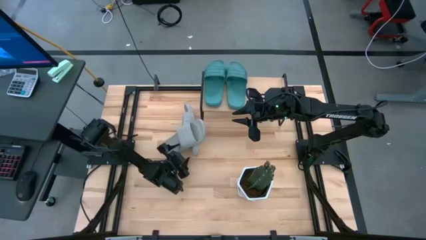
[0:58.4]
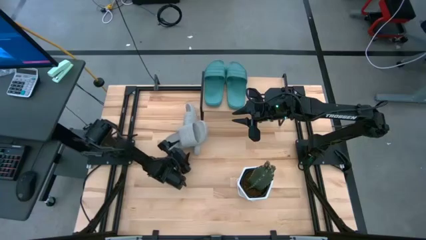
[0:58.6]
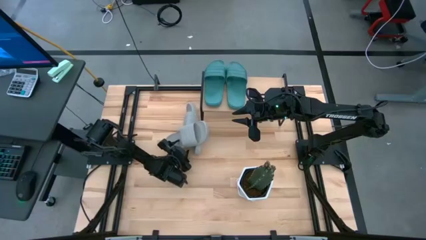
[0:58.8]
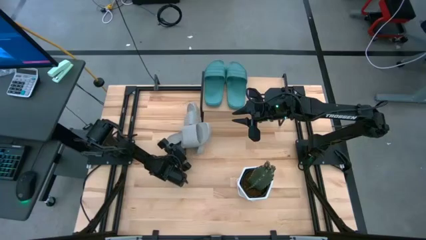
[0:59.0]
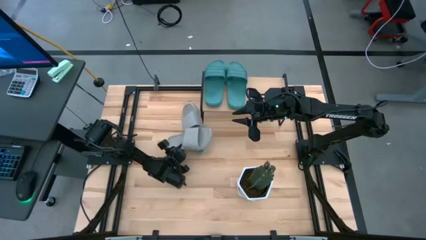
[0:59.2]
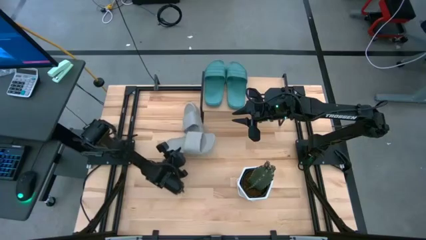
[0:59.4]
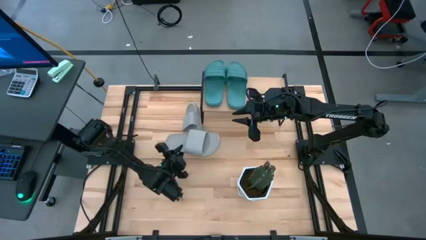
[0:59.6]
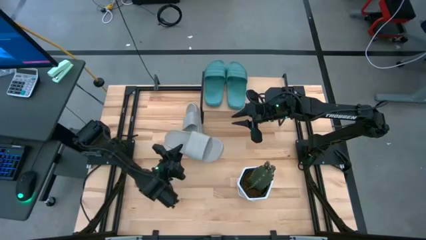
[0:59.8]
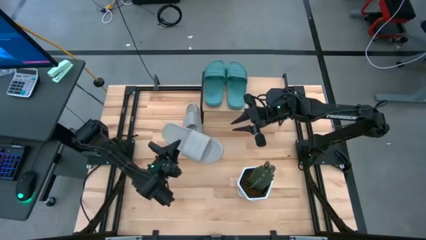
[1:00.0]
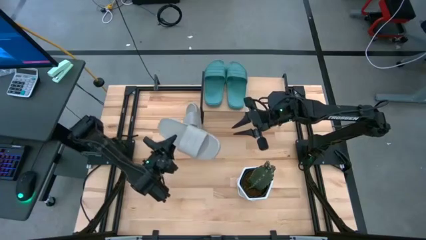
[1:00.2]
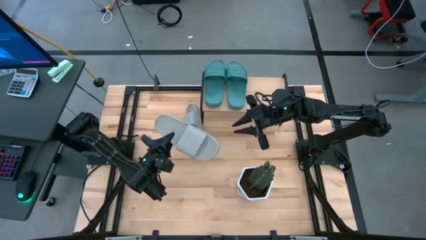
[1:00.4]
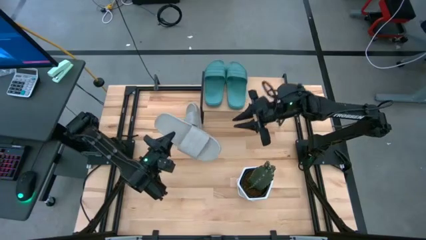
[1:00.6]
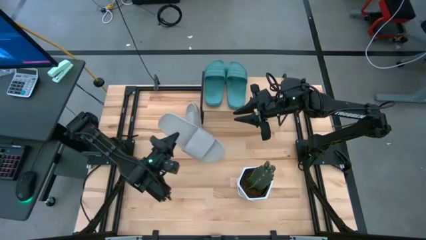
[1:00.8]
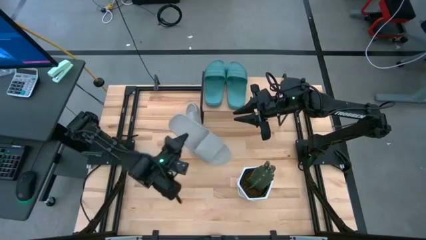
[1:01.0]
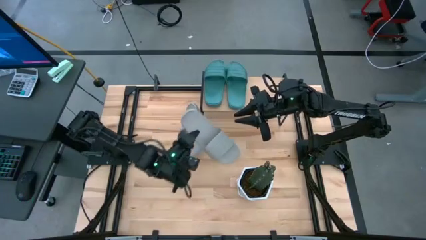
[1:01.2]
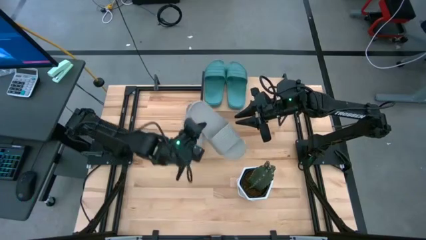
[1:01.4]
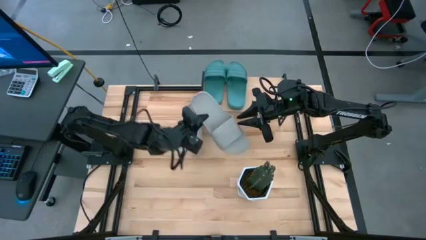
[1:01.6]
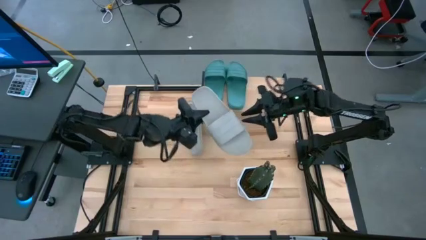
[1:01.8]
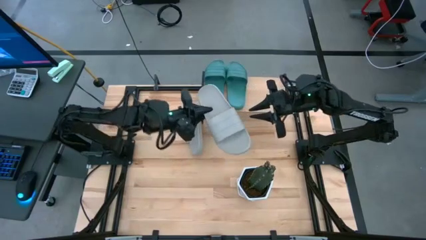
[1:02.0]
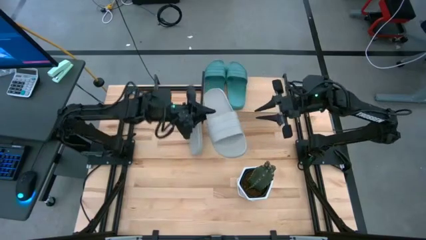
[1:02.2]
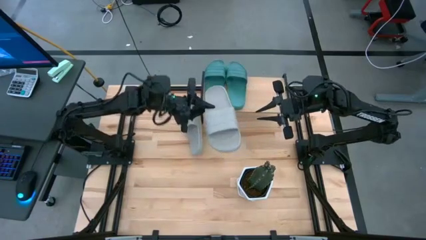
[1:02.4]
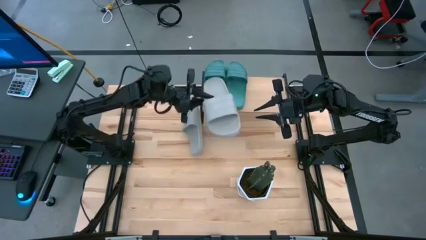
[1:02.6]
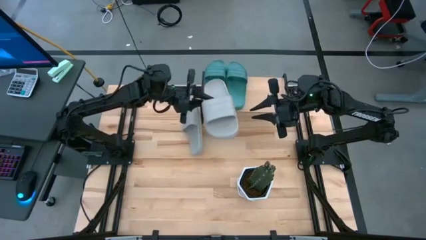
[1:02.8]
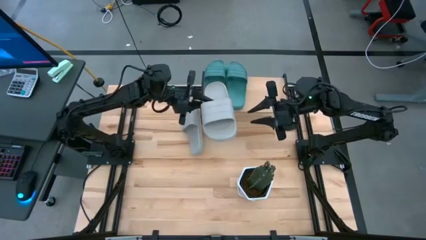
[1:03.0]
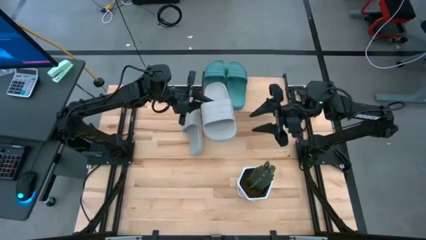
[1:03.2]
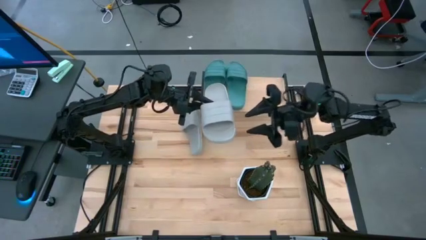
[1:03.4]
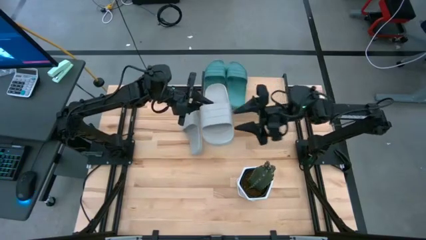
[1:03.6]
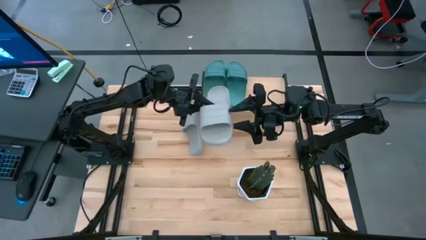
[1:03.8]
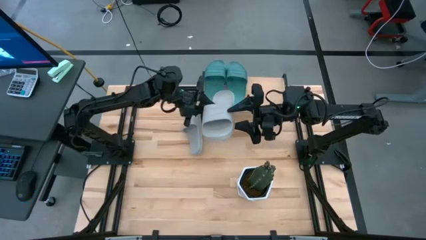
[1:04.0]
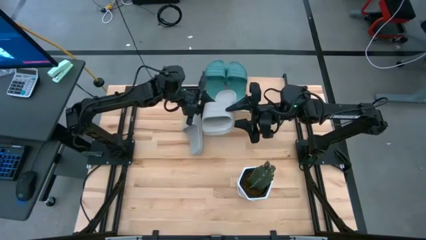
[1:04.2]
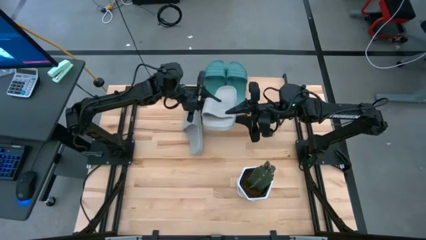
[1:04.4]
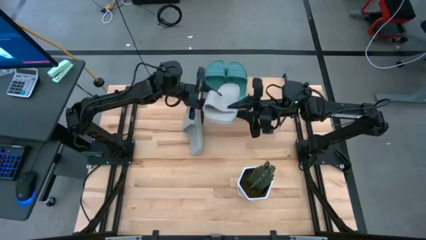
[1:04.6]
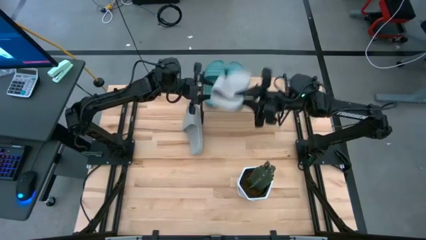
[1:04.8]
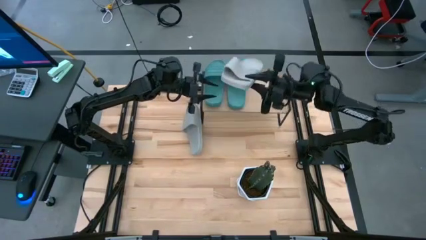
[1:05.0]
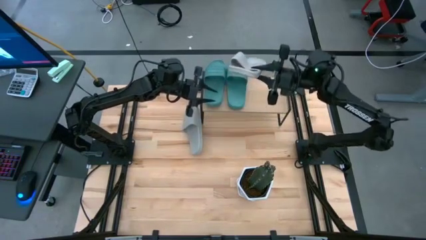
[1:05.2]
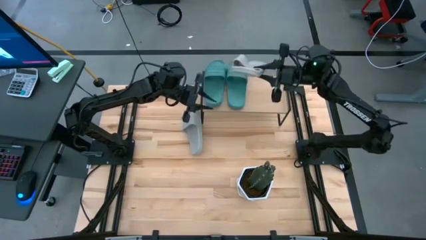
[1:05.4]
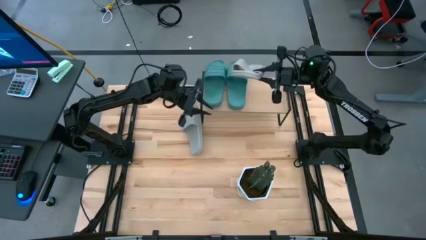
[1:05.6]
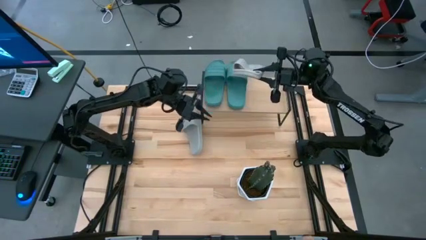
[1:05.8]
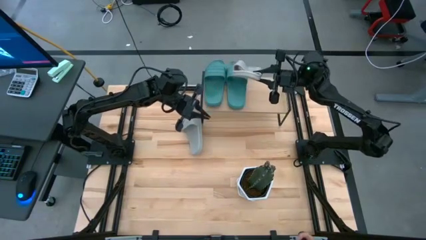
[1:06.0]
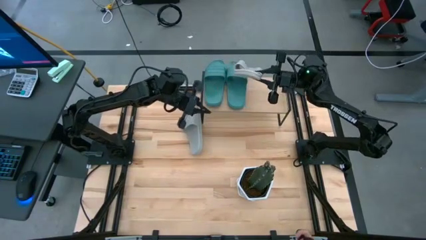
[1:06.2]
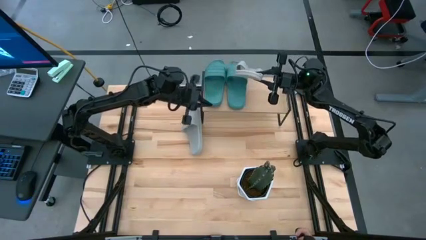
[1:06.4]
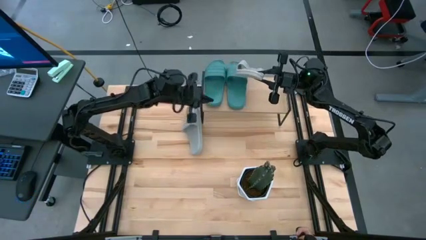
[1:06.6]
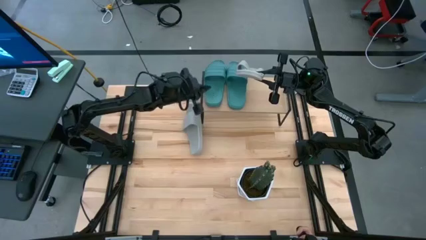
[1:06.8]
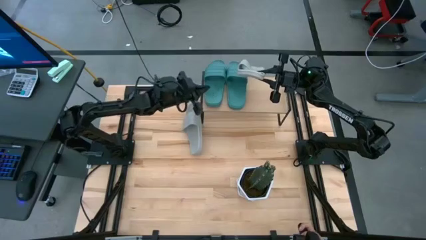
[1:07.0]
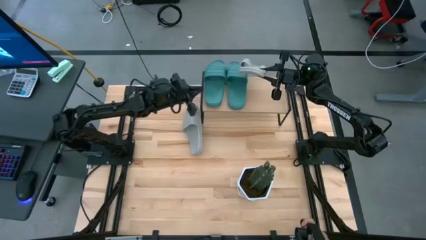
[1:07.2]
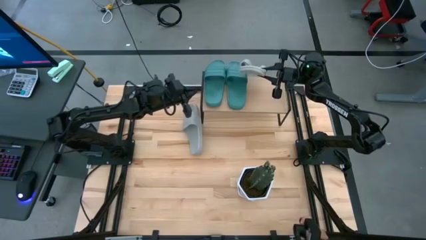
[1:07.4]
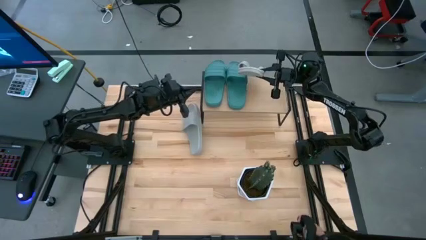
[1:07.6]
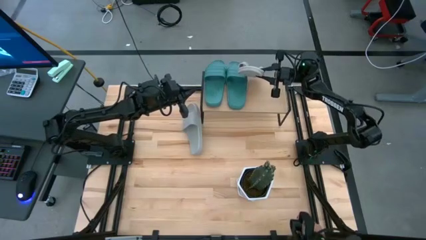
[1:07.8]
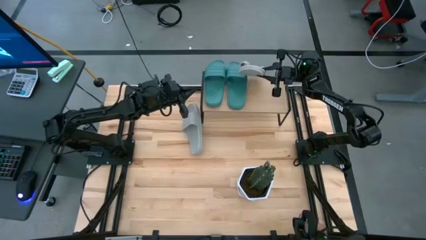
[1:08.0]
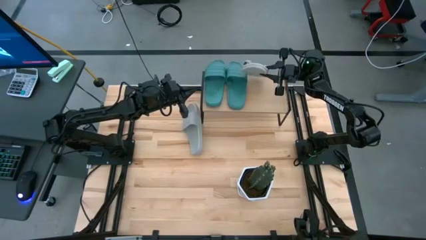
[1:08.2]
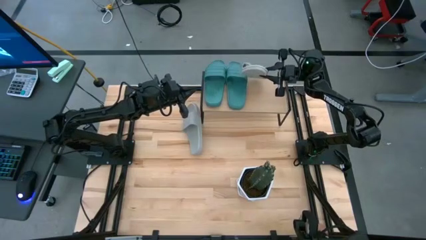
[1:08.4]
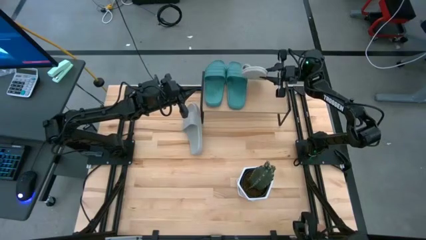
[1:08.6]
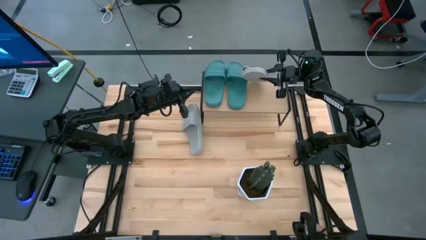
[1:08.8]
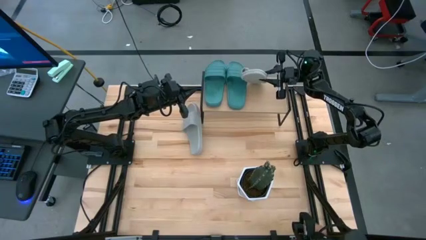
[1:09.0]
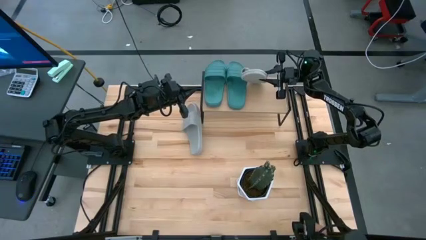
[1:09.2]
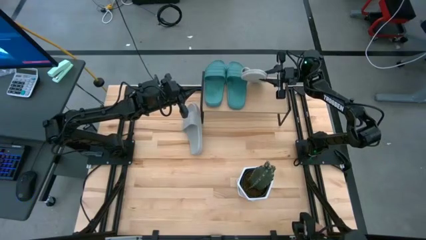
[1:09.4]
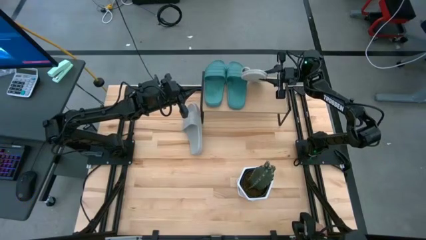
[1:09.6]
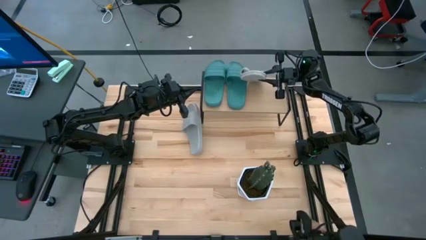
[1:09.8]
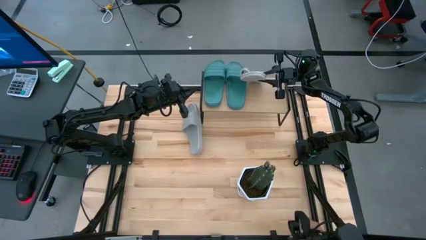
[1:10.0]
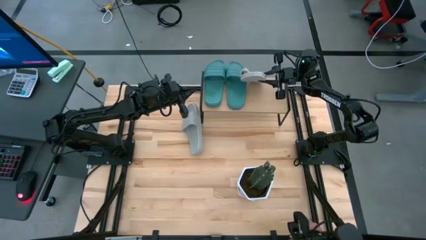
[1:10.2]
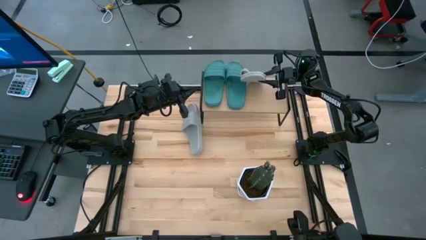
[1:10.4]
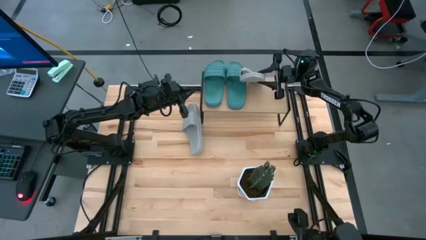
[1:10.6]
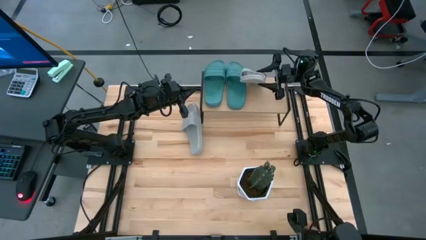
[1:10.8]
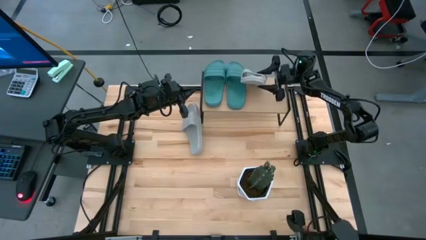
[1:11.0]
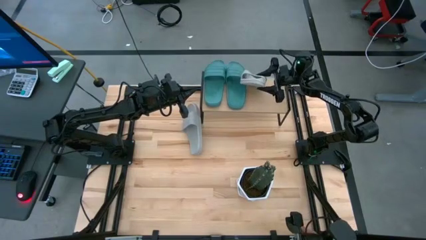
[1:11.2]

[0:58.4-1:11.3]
Task: Pick and place slides into the shelf
Put the bottom gray slides on the shelf

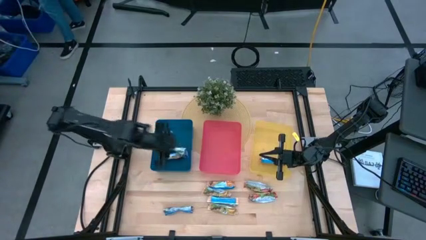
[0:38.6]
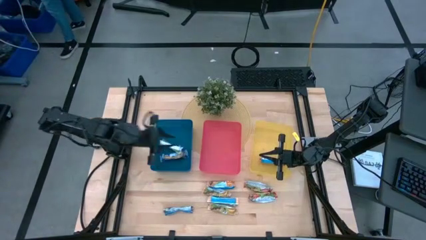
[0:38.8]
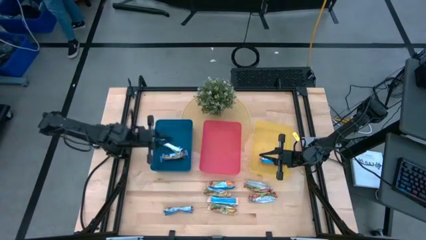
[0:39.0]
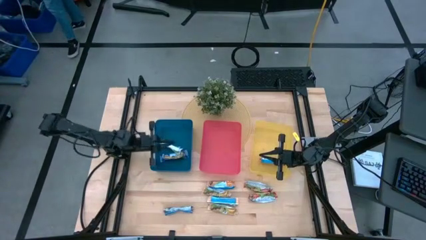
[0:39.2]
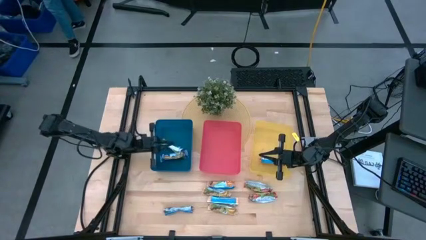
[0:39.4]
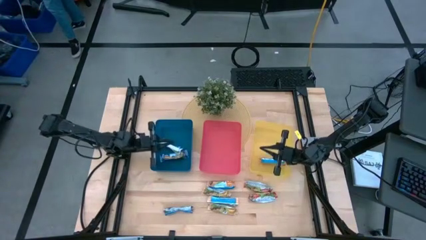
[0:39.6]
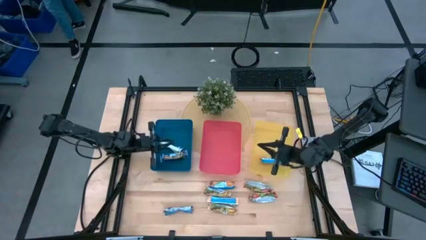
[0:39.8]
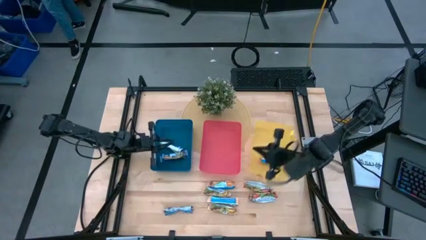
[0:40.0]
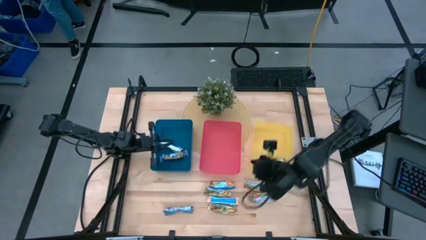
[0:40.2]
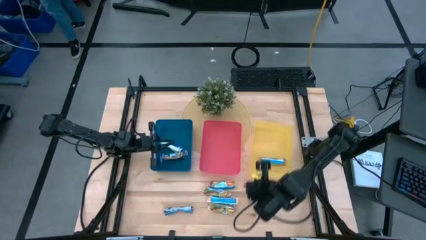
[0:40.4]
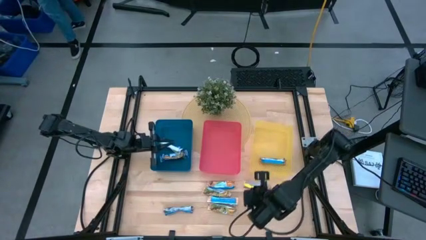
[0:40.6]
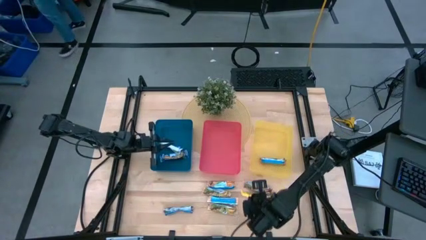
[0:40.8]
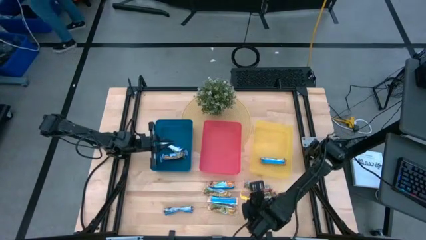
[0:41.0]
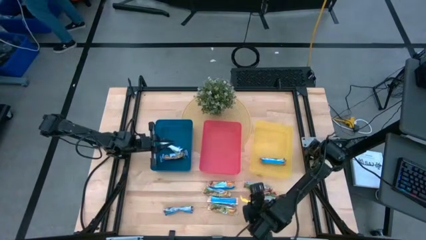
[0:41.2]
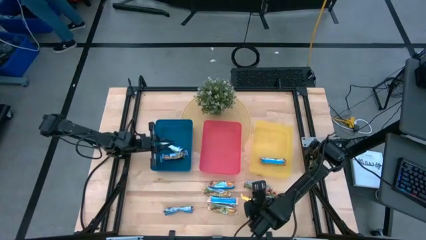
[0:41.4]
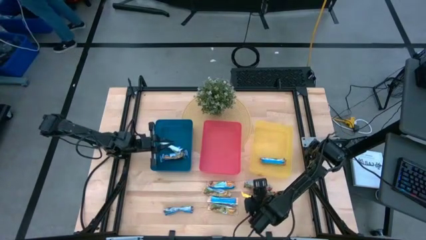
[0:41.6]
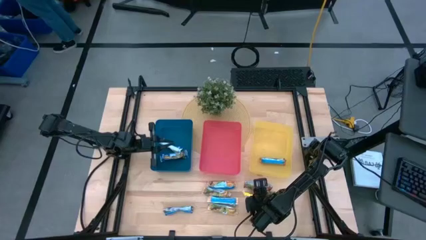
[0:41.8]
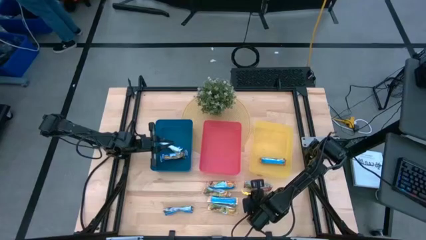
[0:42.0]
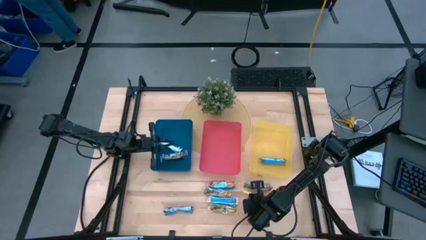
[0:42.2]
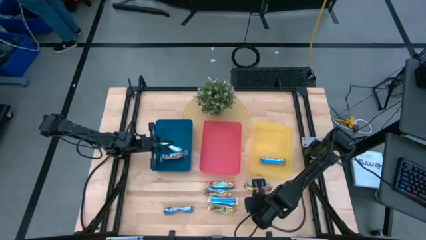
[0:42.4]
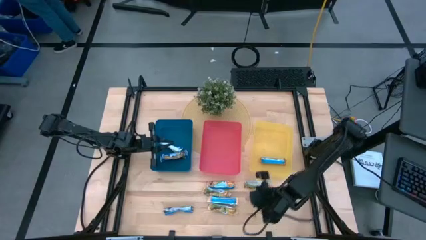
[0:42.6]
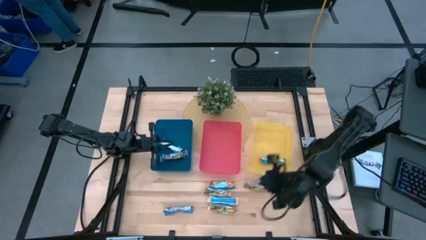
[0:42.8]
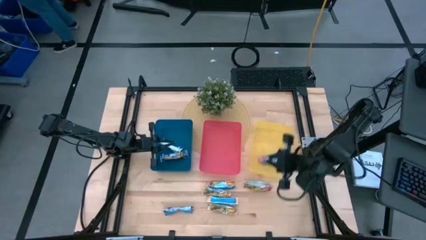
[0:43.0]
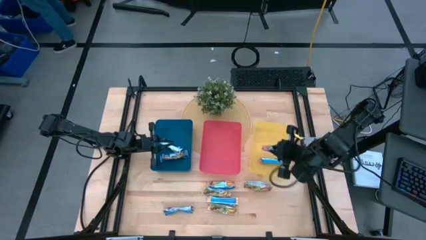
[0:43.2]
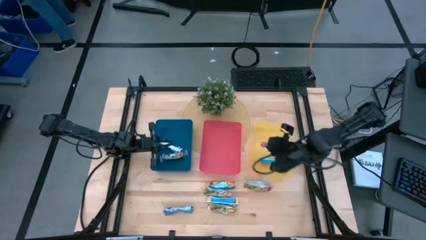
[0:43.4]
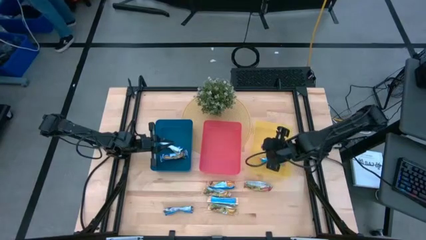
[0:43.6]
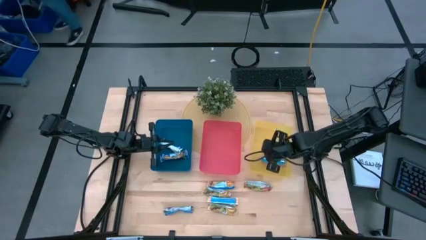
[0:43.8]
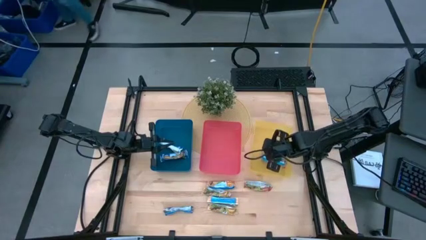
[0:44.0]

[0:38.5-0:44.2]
Task: Pick and place Granola Bars by type
Put the bottom red granola bar into the yellow bin
